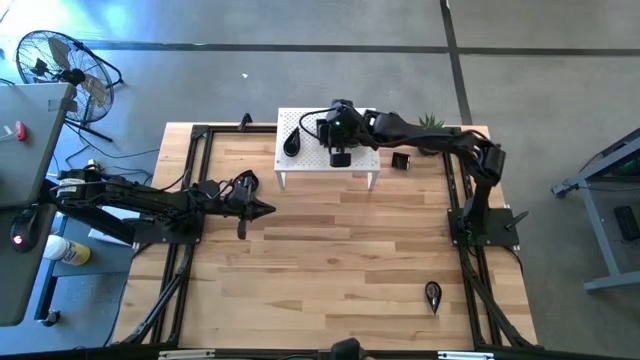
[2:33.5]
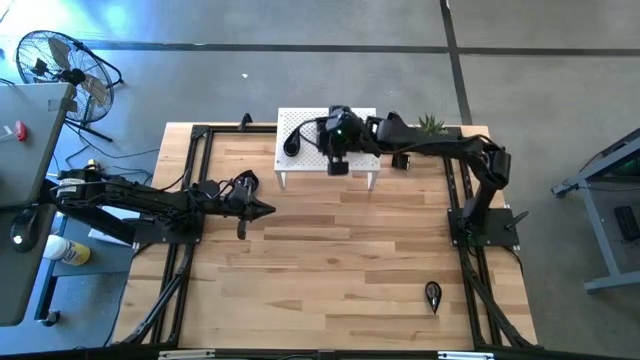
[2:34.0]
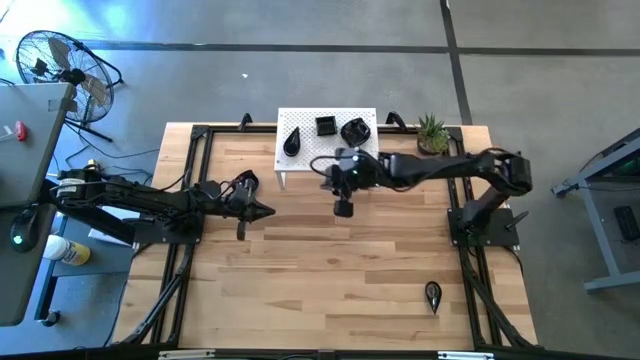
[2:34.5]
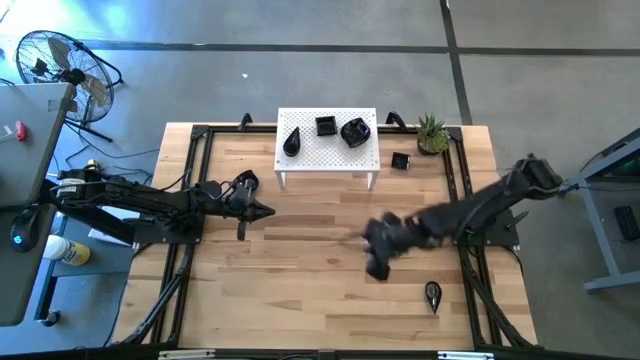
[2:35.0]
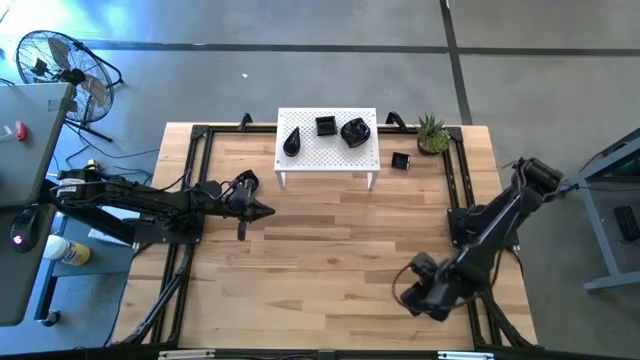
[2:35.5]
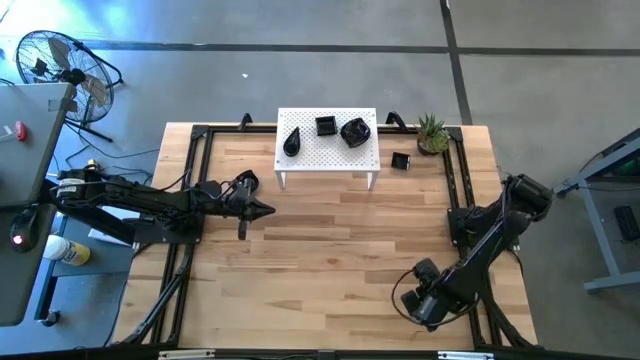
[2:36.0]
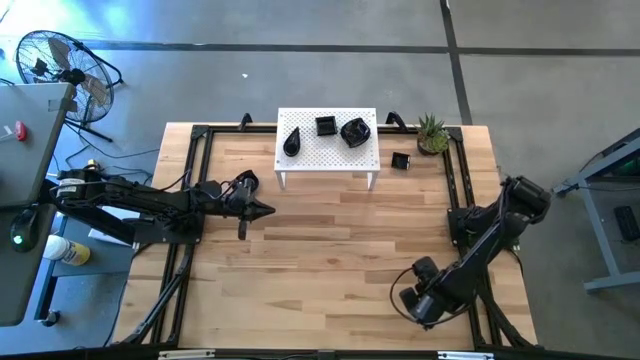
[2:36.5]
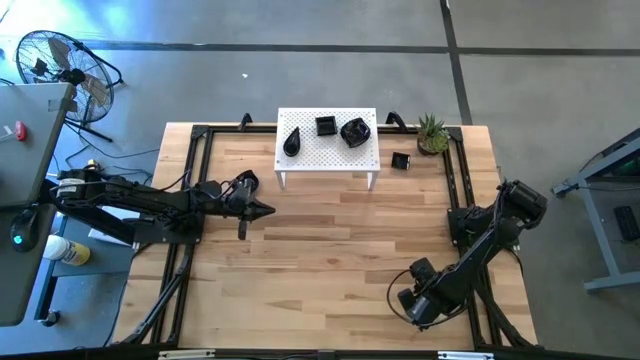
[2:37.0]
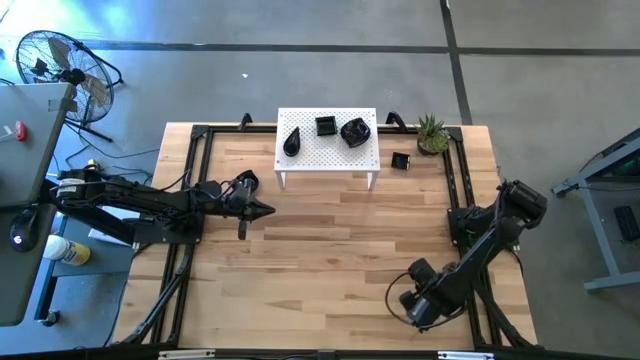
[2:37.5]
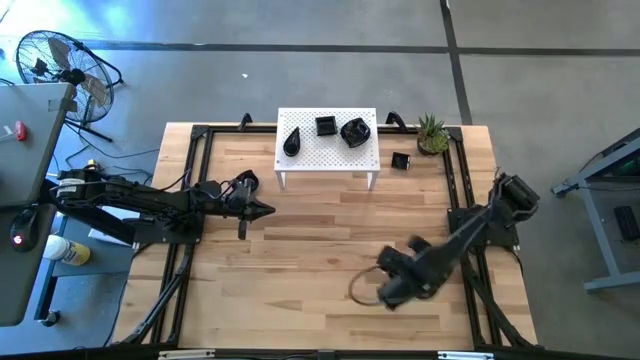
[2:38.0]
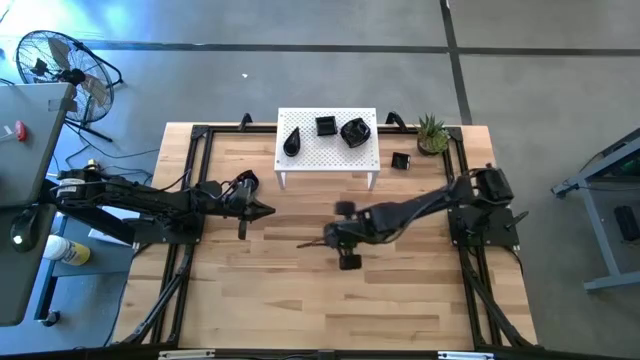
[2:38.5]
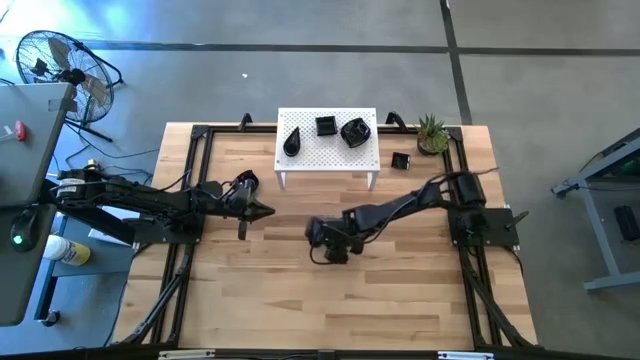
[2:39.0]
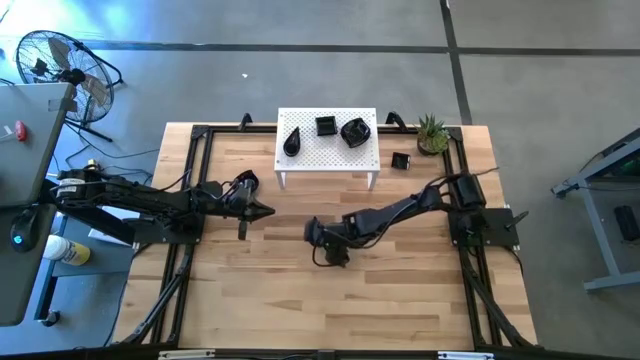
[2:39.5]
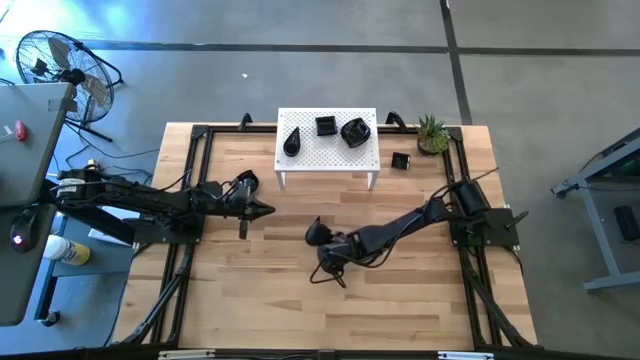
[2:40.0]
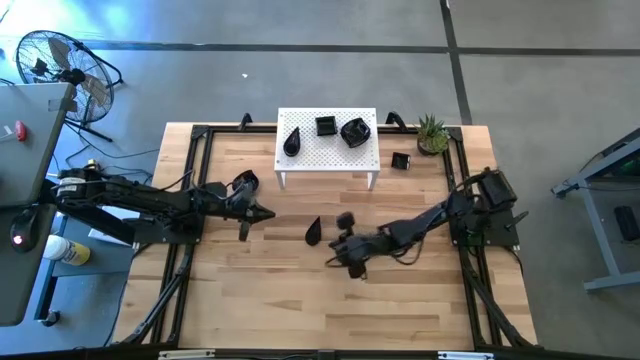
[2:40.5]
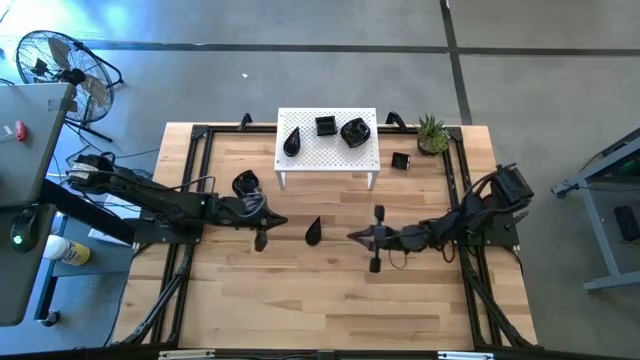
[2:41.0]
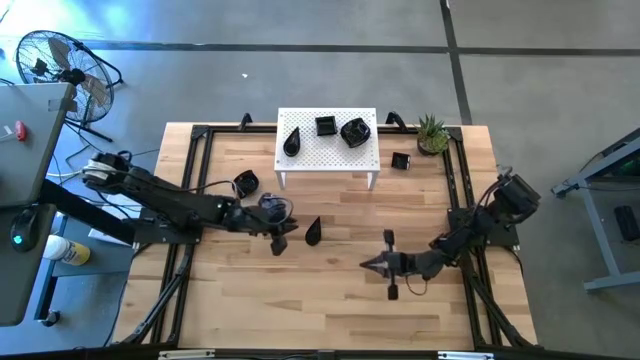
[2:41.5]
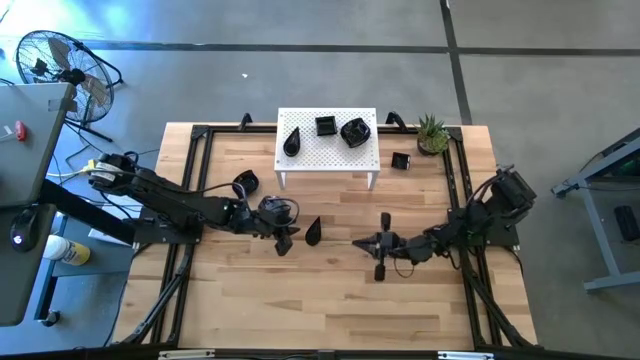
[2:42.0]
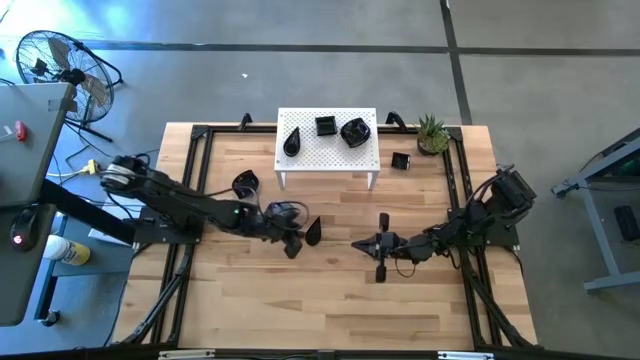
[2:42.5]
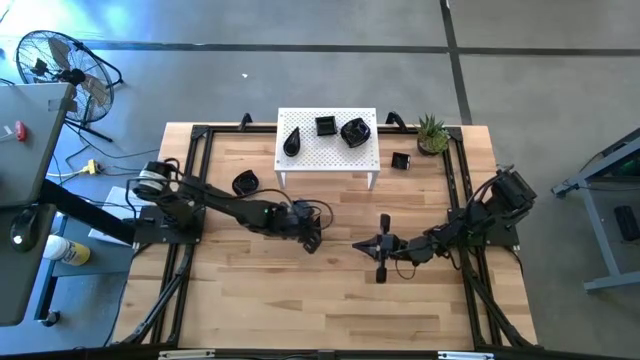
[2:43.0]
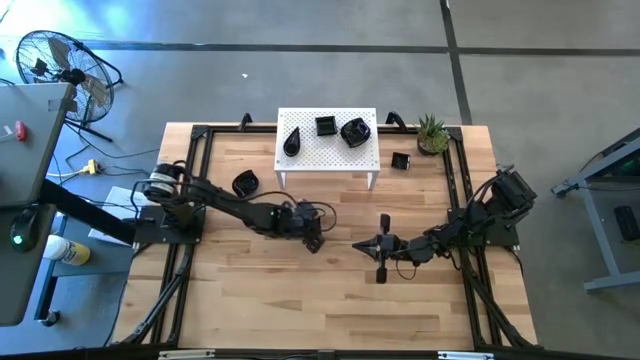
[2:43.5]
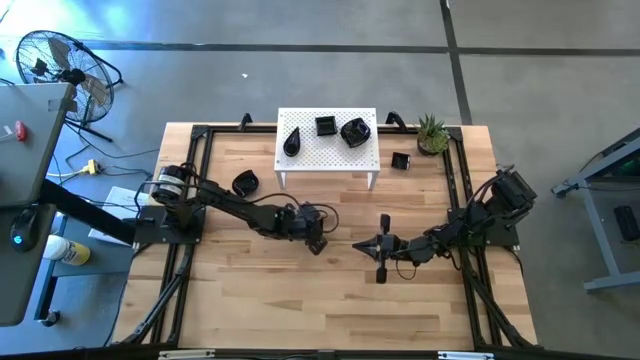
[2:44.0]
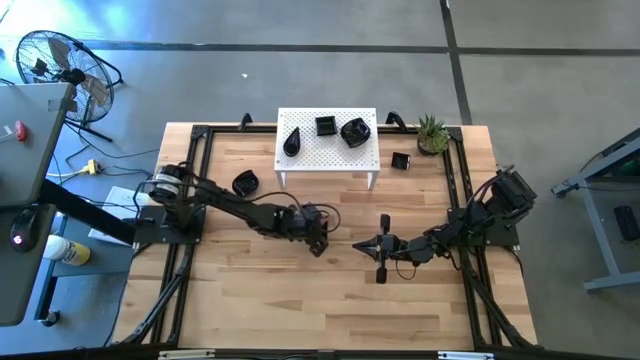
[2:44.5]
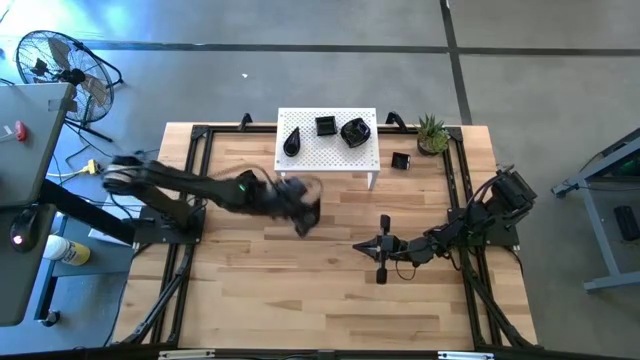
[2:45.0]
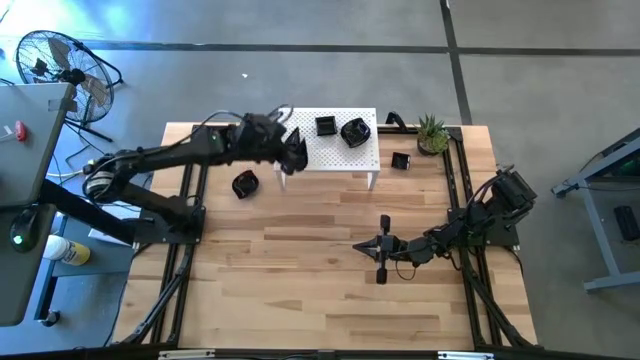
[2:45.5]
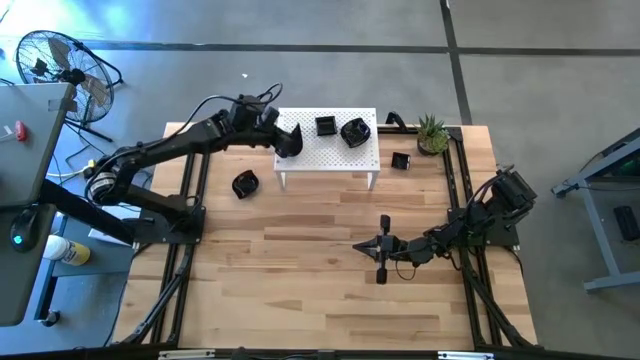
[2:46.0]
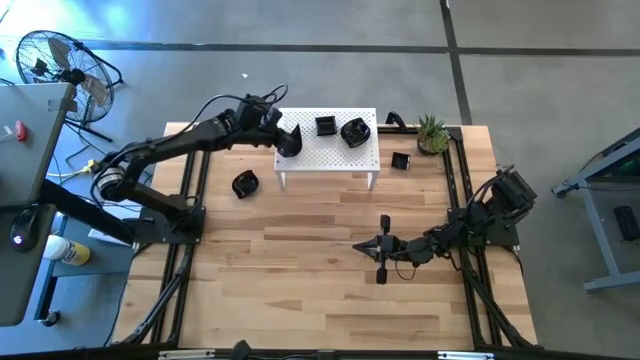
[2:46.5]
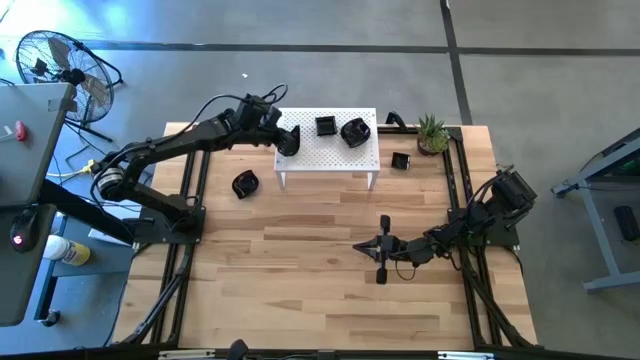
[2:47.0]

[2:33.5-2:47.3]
Task: Pick & Place Mini shaped plates
Stack the drop shaped bowl on top of the drop shaped bowls on the shelf

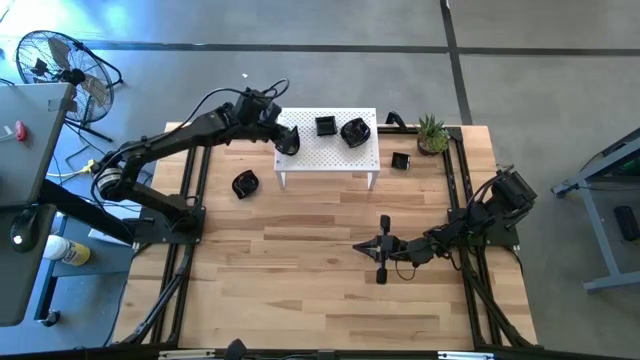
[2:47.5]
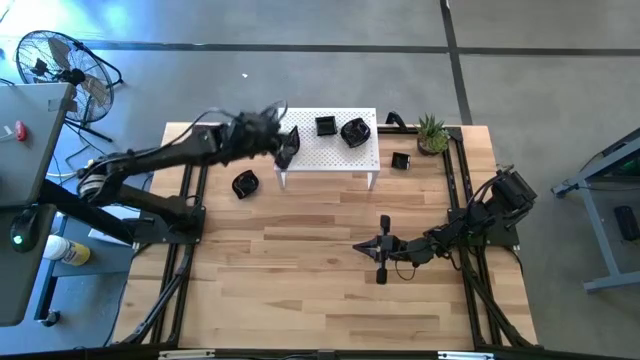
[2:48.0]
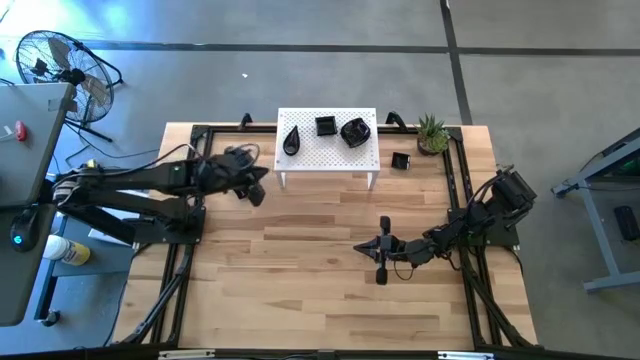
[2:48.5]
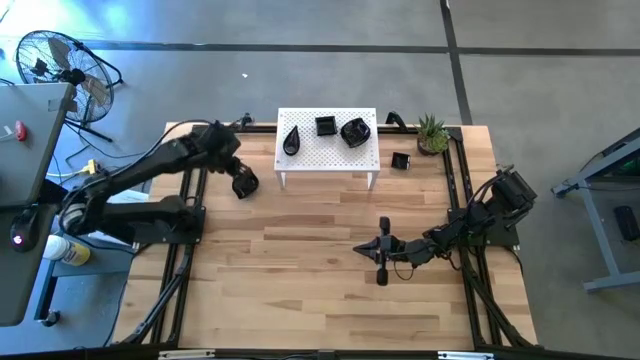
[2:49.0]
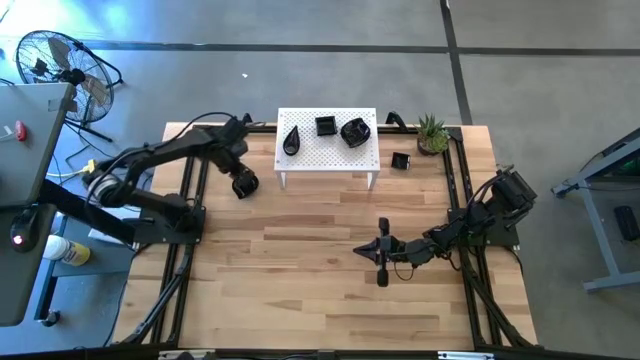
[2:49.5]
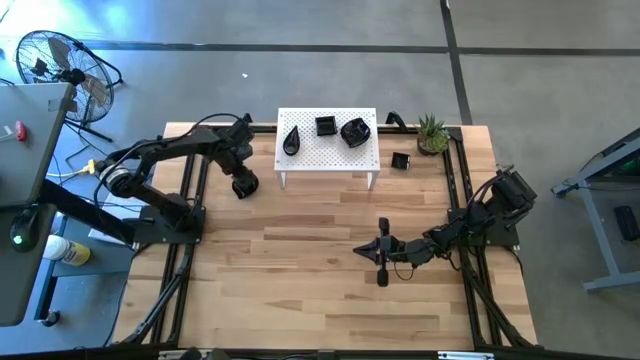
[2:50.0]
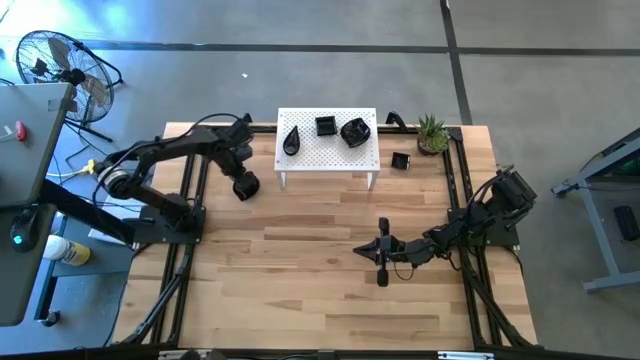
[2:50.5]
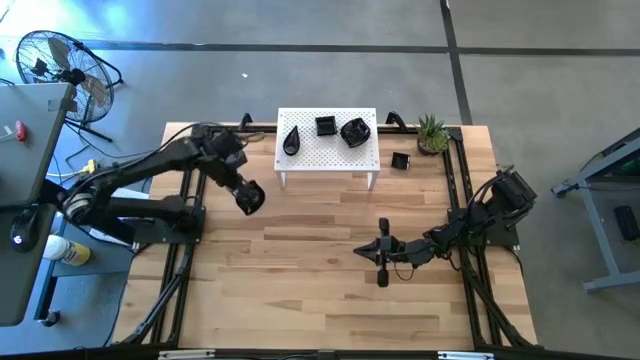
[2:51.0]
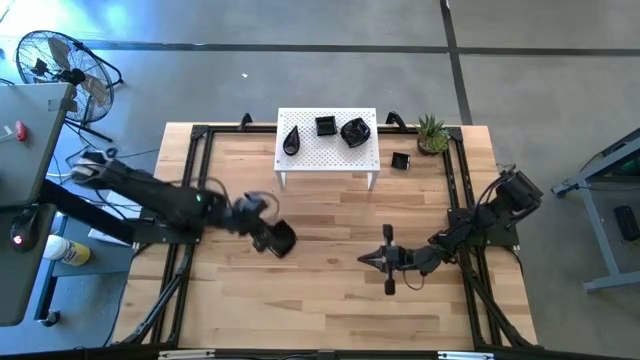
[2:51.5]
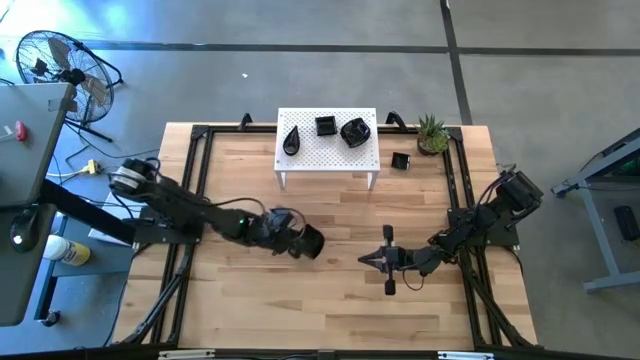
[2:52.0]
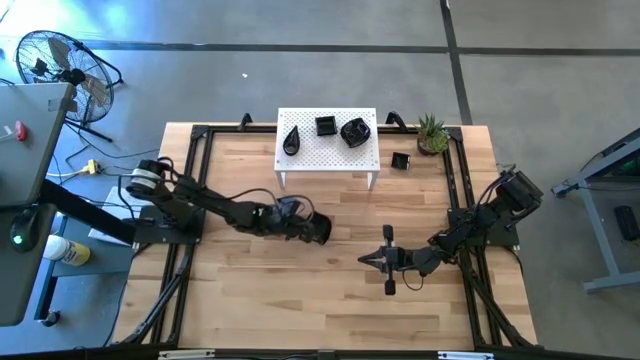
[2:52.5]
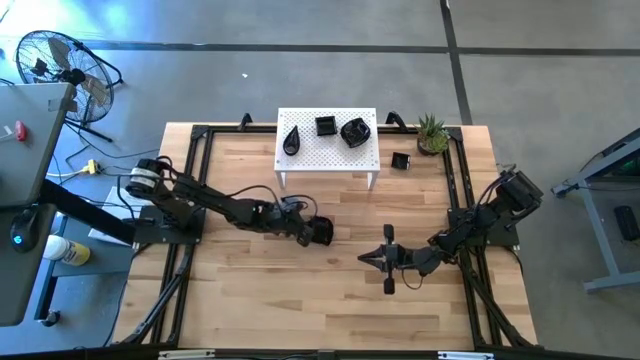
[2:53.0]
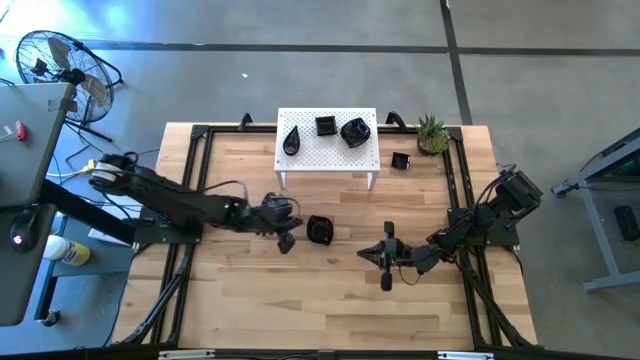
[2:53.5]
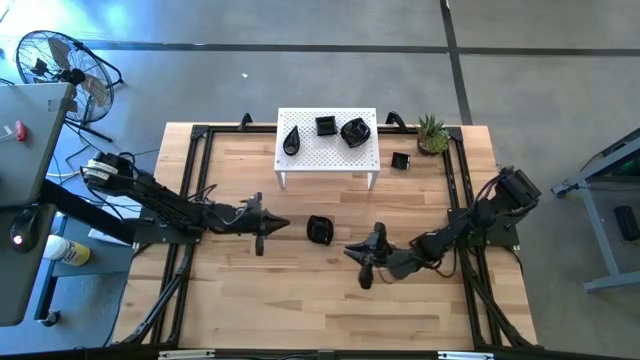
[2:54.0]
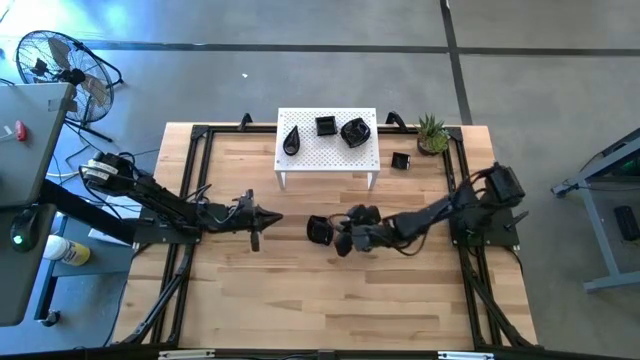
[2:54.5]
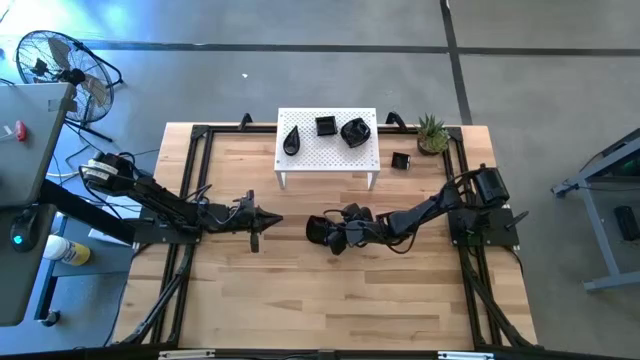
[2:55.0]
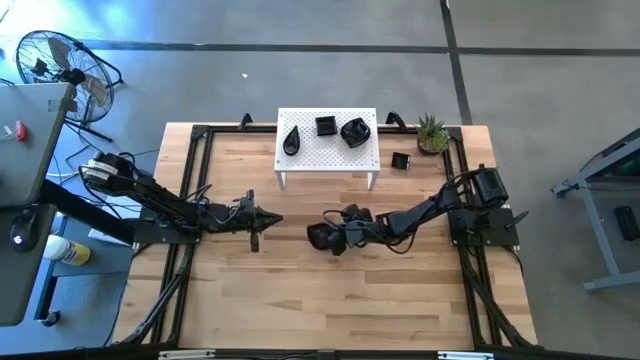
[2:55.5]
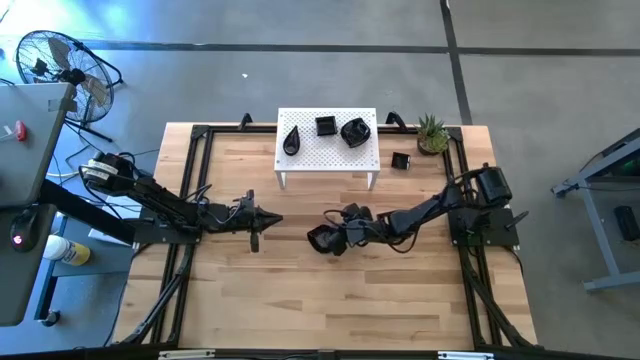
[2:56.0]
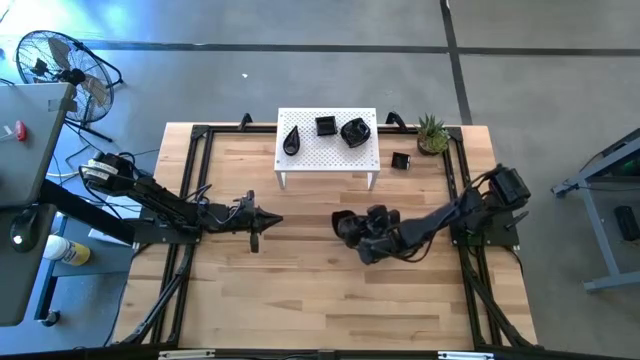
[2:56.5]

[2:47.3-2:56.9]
Stack the leaf shaped bowl on top of the leaf shaped bowls on the shelf
